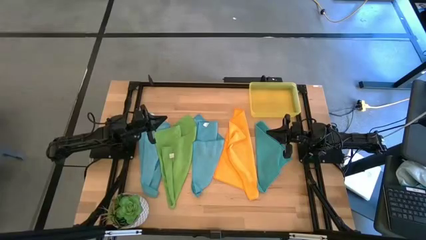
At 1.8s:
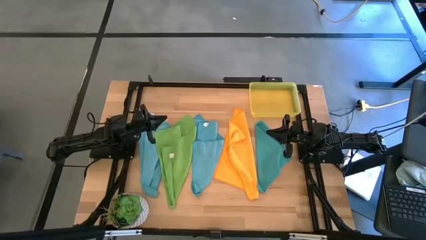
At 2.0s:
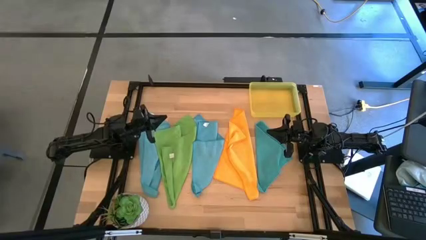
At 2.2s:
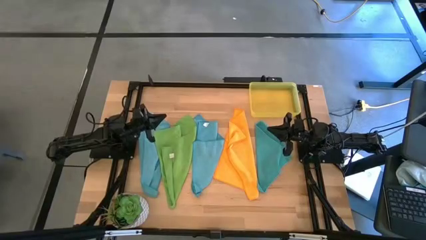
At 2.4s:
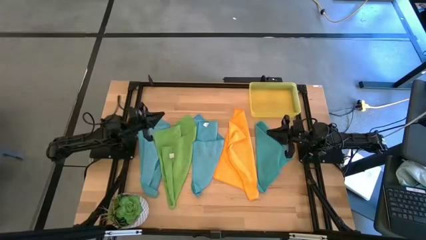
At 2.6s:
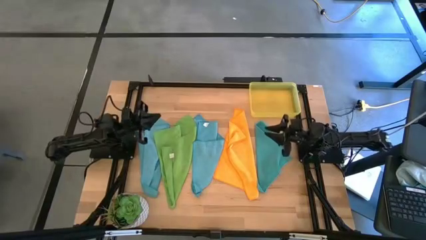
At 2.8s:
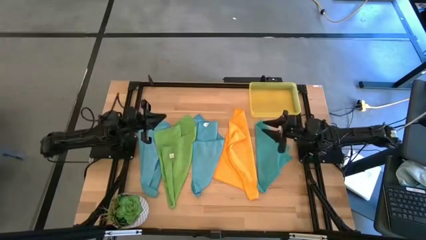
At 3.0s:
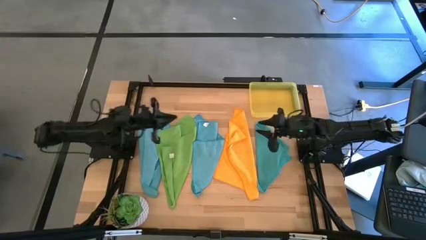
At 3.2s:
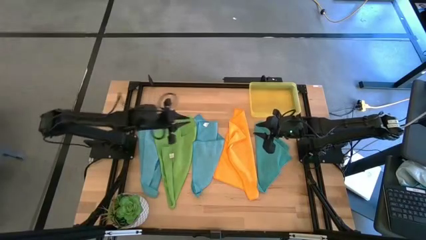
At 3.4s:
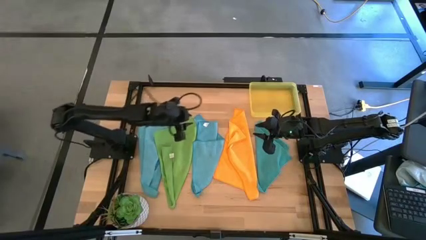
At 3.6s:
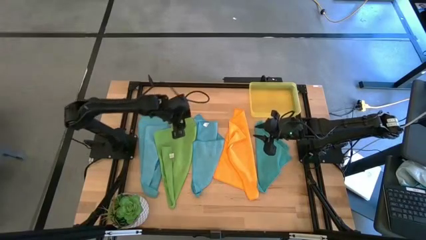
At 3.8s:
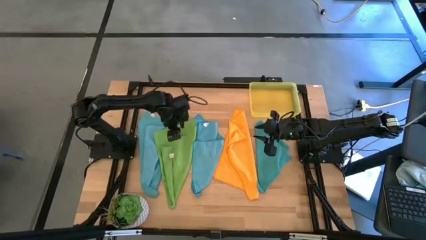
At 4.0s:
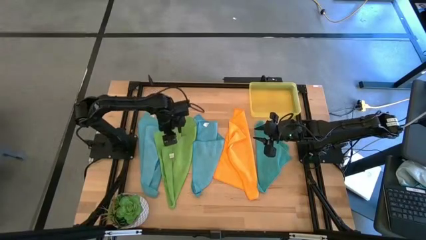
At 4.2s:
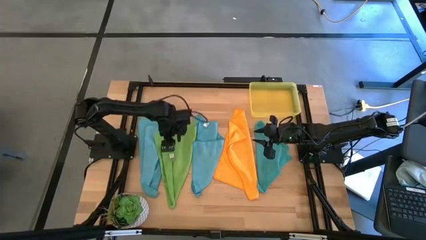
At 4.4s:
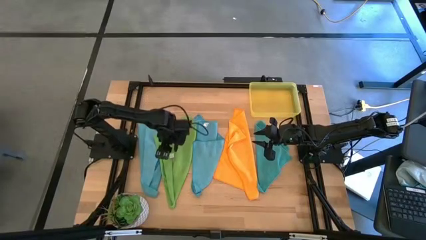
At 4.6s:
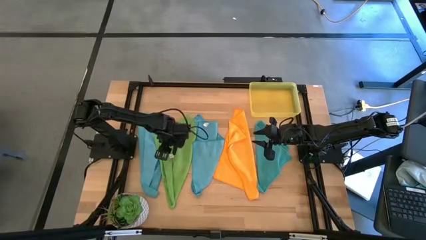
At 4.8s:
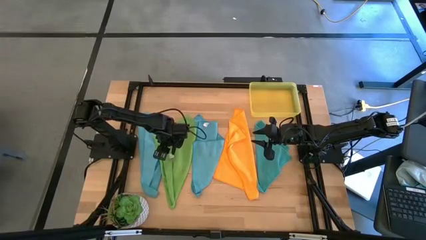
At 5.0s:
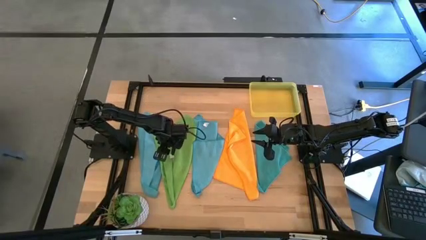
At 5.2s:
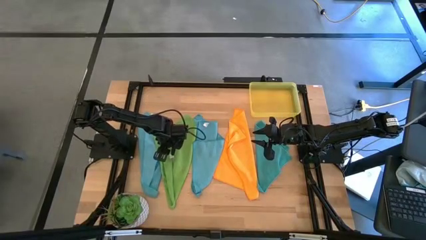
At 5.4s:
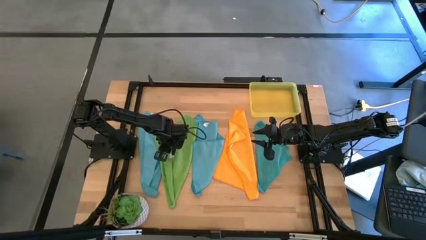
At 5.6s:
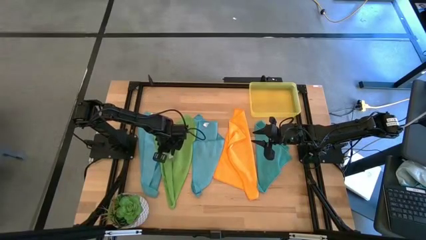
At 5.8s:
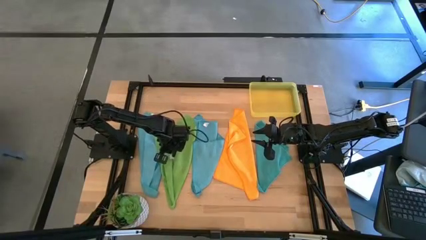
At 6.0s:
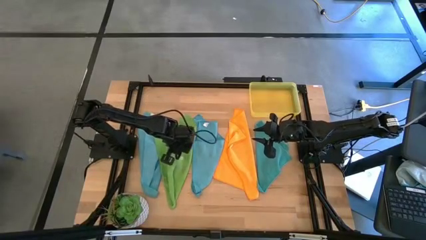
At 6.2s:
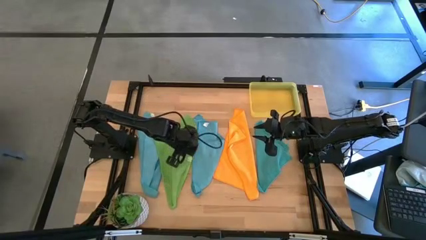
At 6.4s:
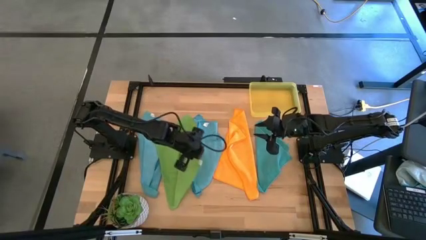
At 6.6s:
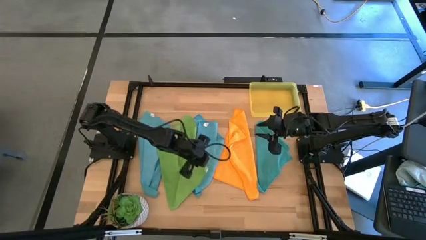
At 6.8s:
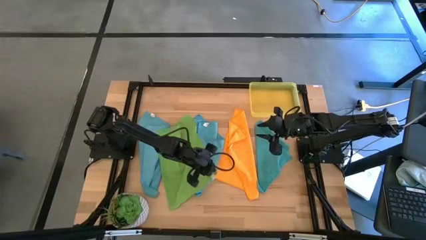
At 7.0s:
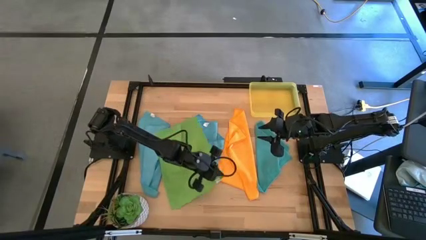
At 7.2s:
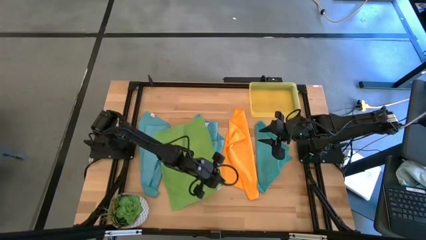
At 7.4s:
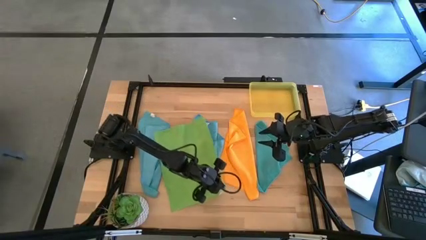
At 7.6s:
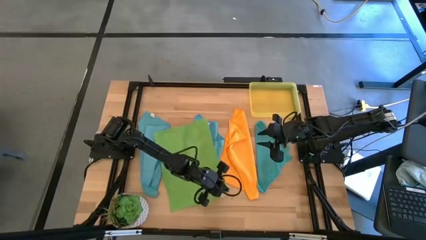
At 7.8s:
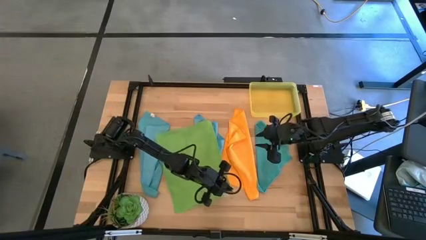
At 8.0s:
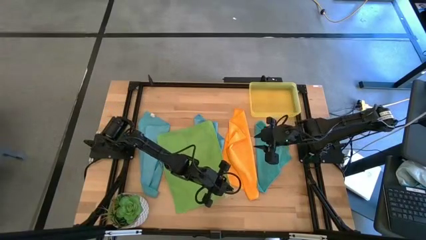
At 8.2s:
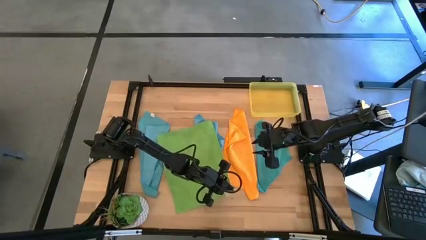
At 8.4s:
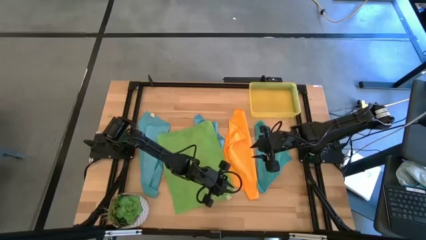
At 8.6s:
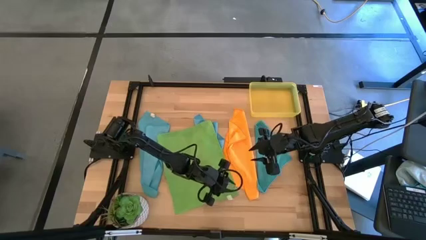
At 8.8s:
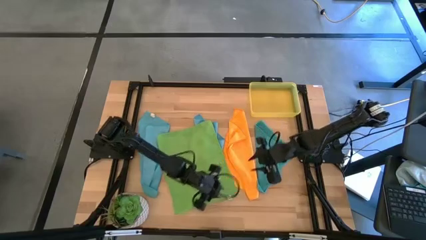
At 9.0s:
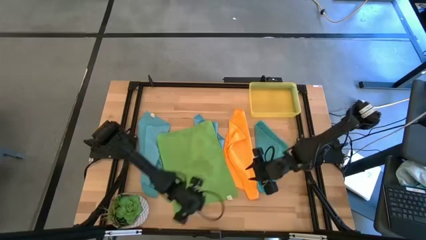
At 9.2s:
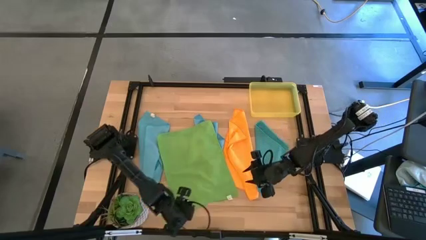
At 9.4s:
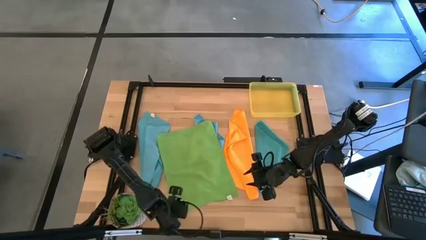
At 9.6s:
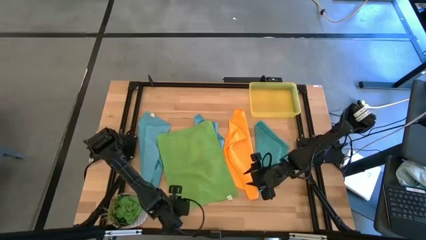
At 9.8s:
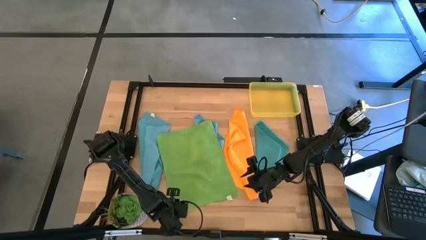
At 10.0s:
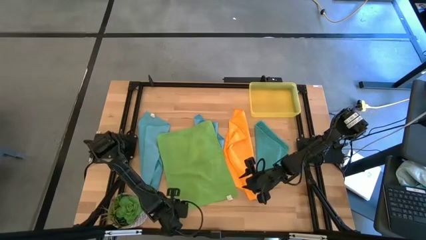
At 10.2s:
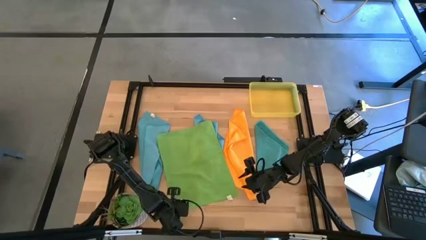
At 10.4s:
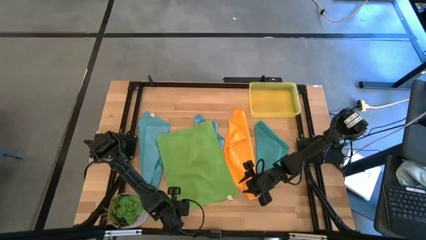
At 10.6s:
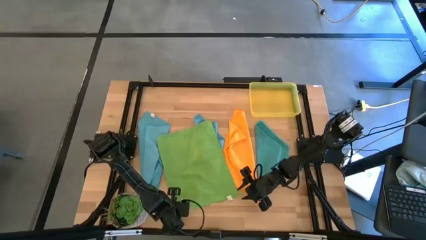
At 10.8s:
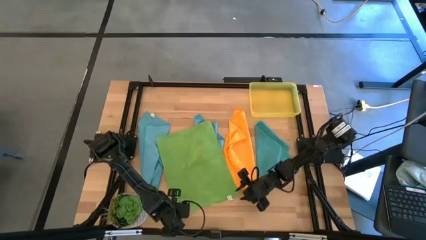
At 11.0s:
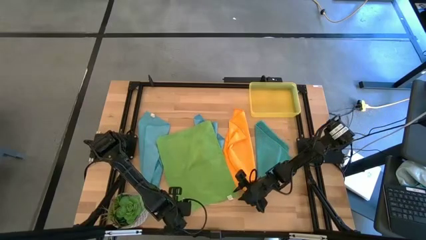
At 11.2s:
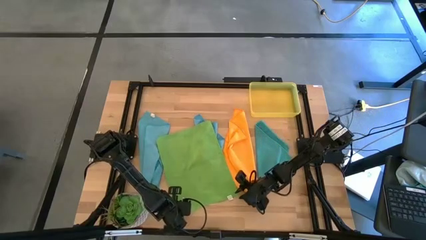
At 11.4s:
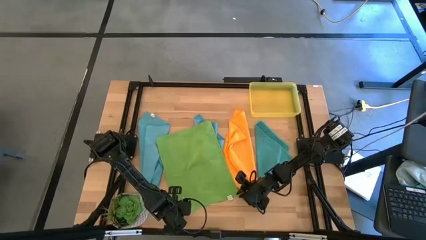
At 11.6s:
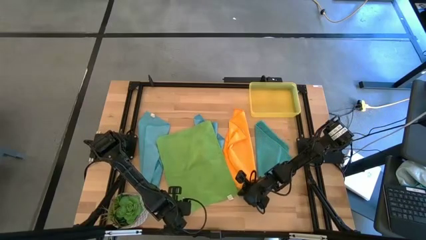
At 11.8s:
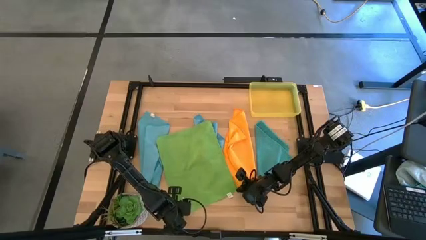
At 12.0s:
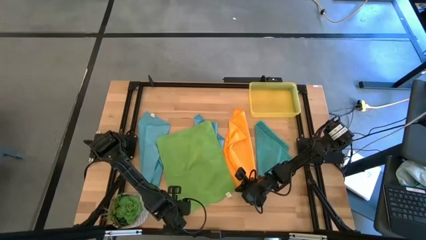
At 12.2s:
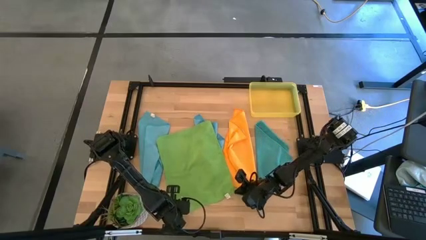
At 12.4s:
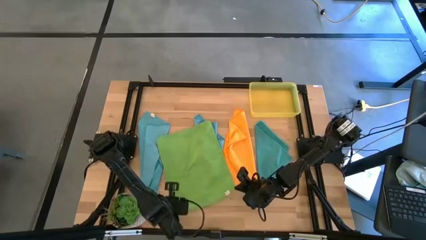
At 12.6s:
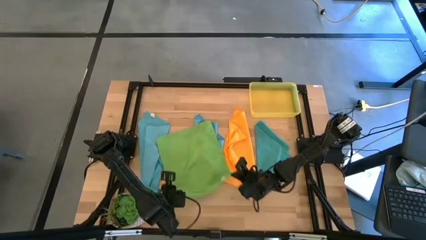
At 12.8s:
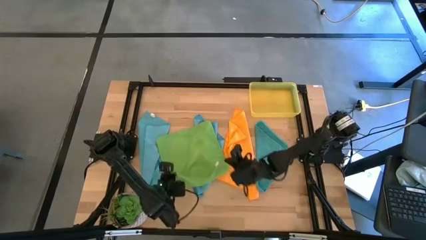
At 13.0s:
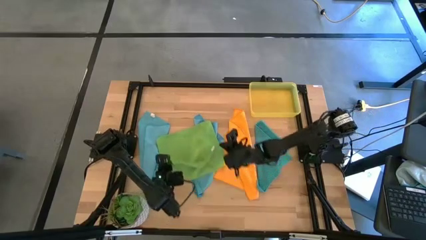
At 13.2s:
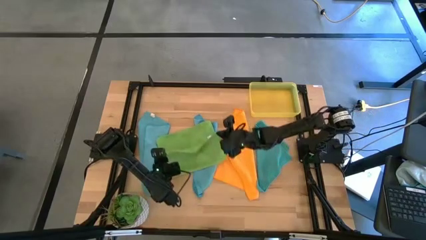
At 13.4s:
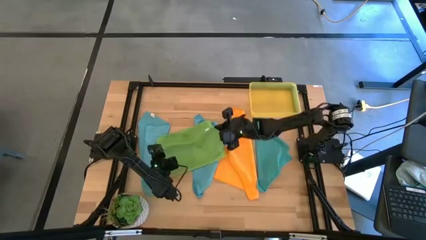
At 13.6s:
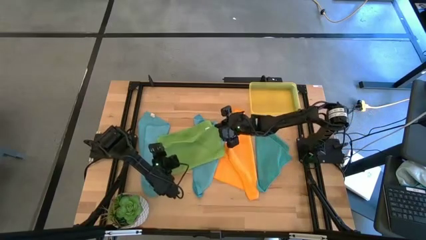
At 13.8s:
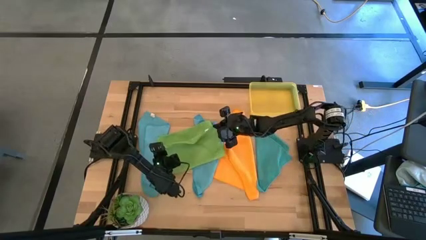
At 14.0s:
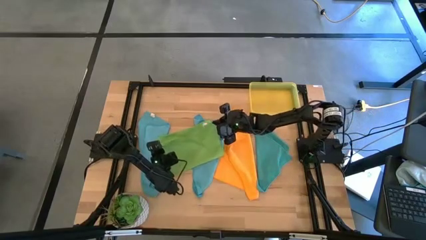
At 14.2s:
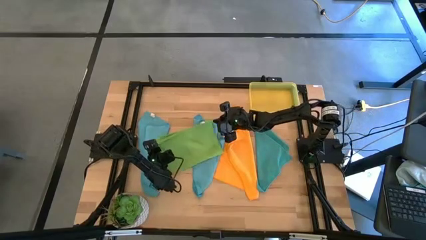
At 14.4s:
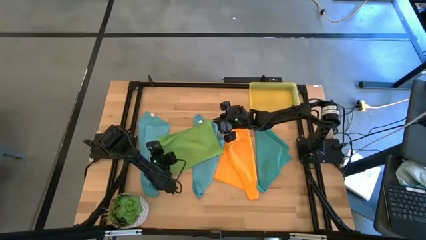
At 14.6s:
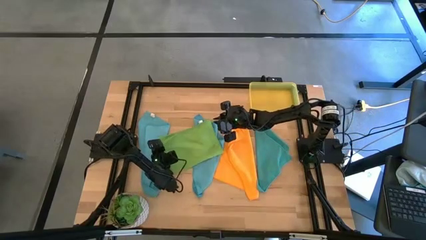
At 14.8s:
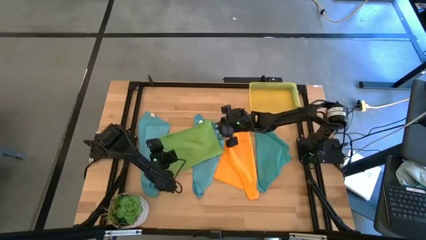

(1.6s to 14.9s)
Task: Fold microfiber towels
Fold the green microfiber cloth
